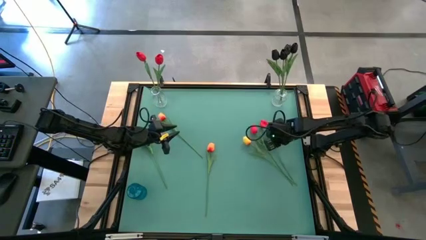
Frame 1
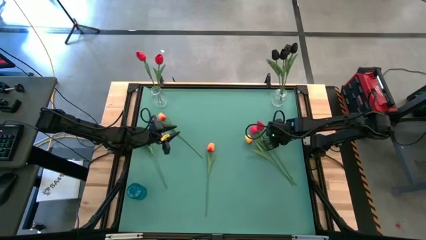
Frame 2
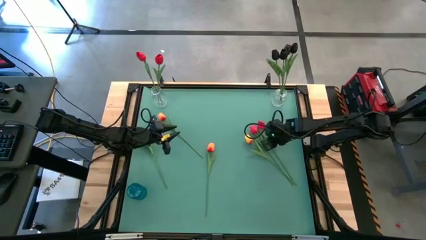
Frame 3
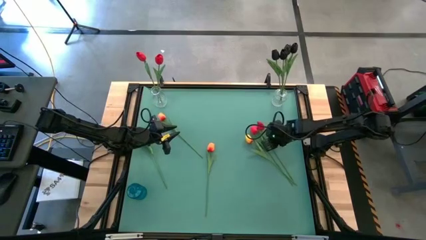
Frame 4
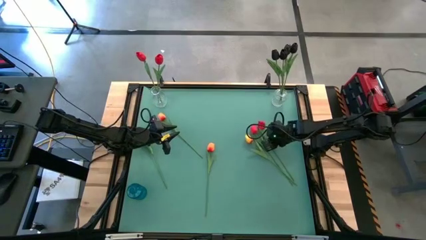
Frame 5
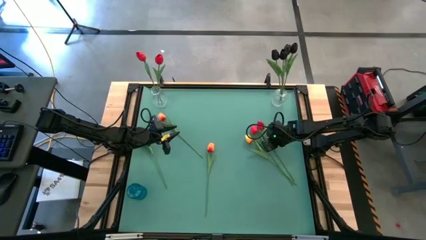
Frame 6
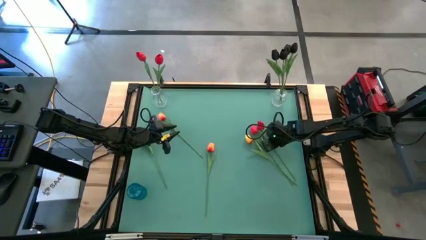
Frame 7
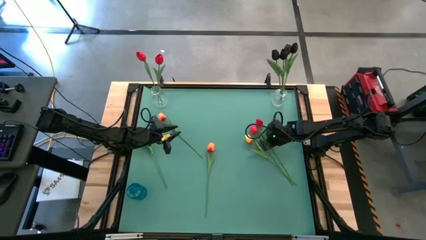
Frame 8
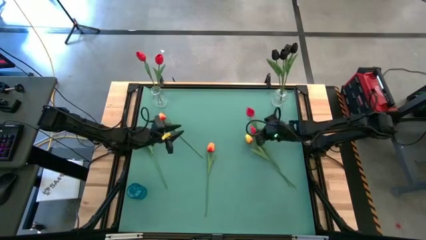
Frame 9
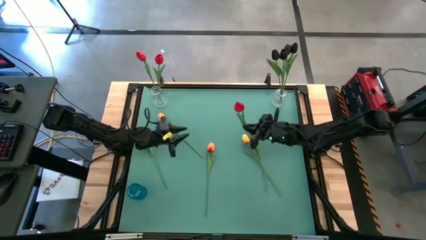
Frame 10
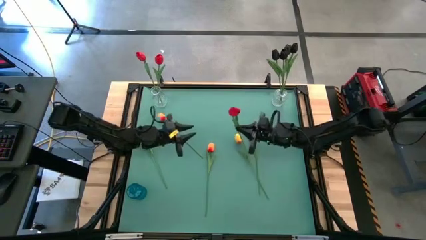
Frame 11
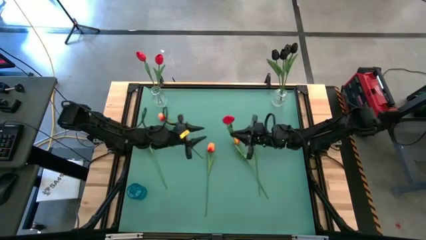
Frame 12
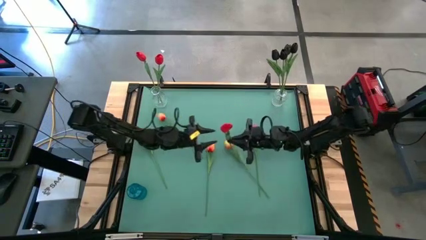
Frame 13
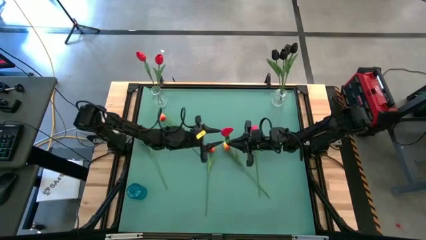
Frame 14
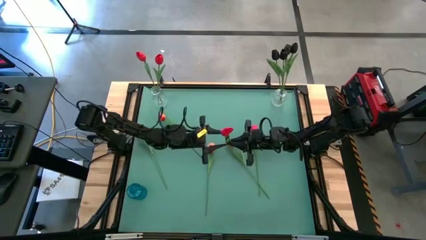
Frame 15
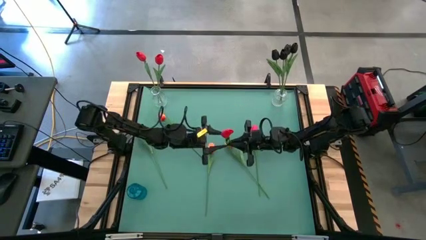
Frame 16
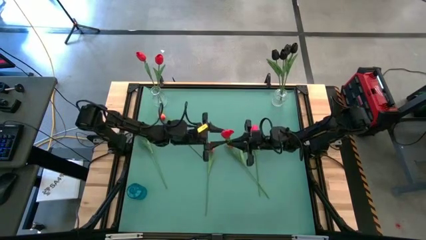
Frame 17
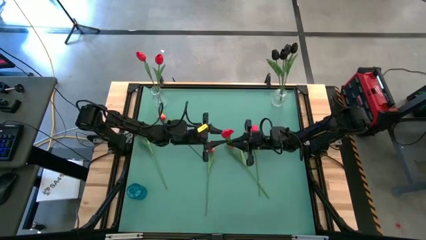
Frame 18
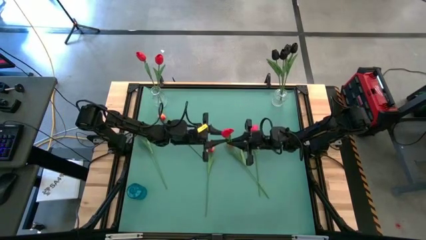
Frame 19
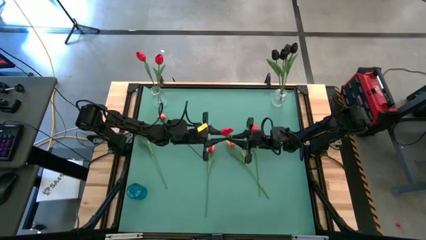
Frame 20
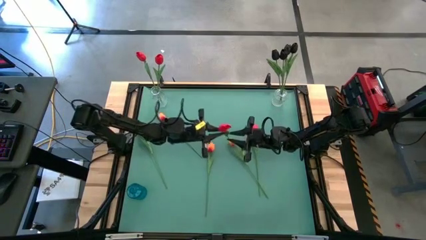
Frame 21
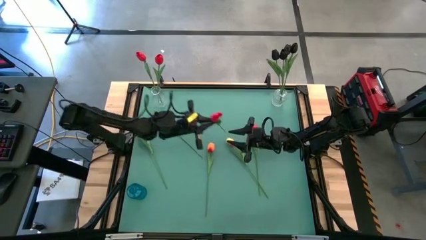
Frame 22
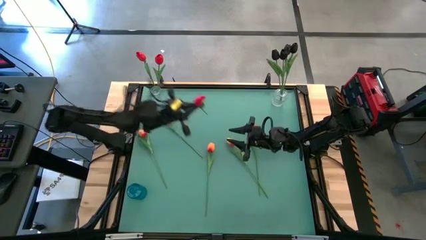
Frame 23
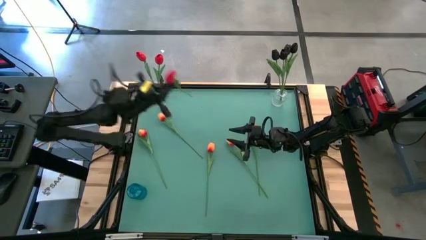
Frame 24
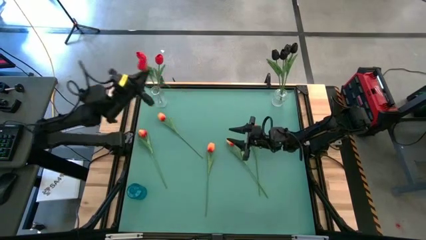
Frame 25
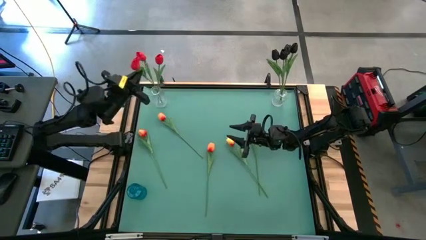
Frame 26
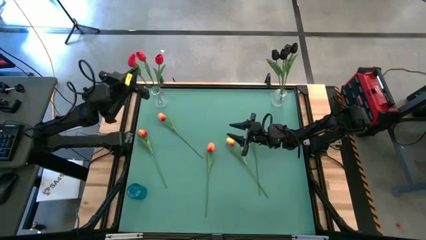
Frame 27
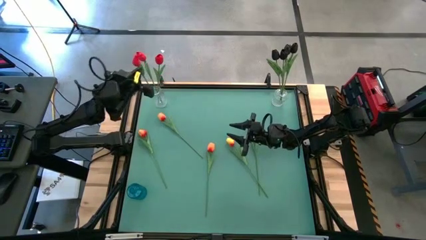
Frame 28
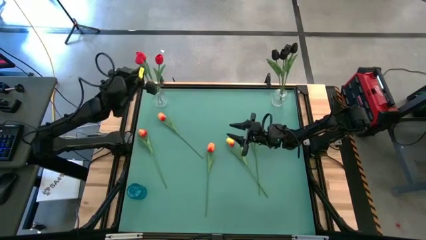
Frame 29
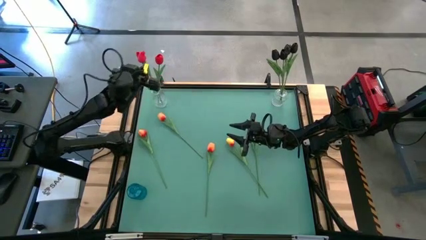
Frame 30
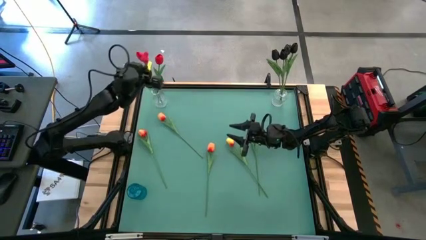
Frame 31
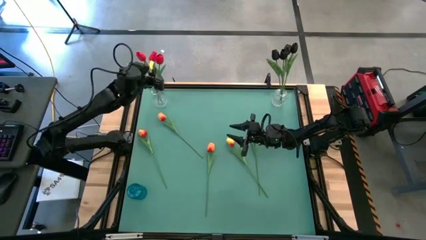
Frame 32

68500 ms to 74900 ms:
Task: Sort flowers into vase by color
Put the red tulip into the left transparent vase

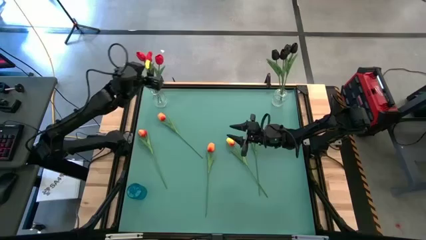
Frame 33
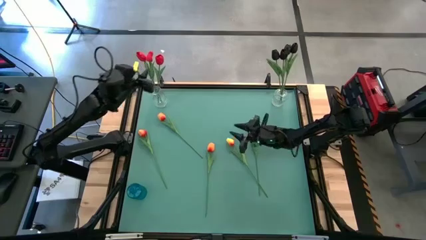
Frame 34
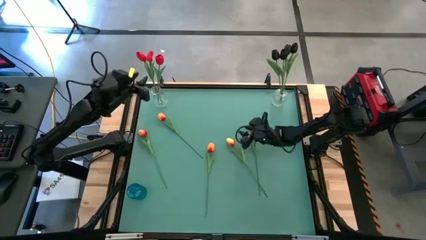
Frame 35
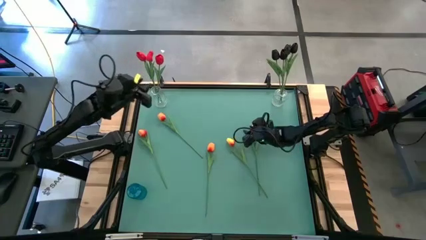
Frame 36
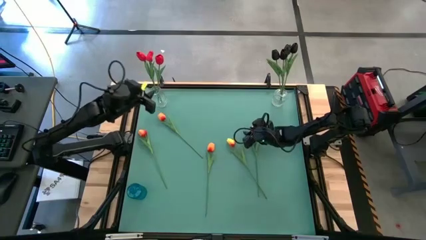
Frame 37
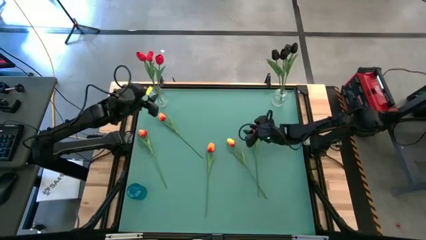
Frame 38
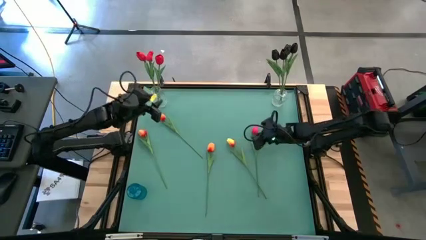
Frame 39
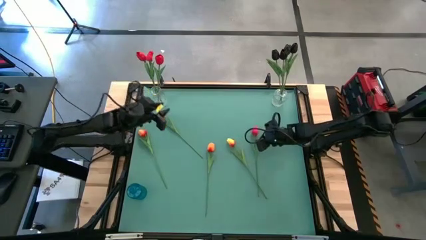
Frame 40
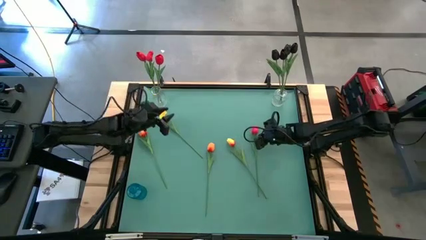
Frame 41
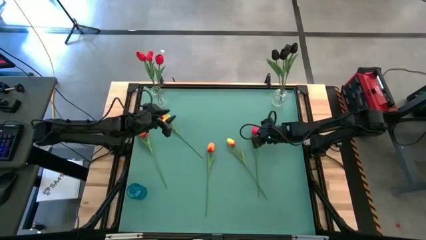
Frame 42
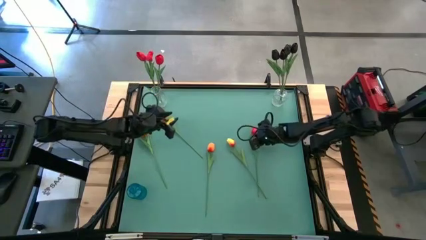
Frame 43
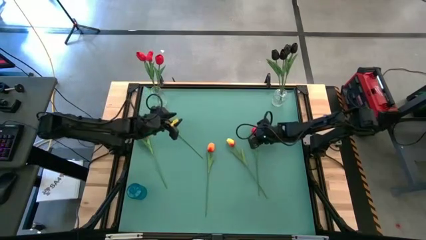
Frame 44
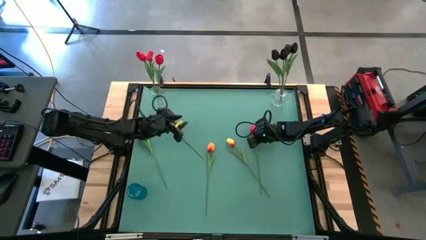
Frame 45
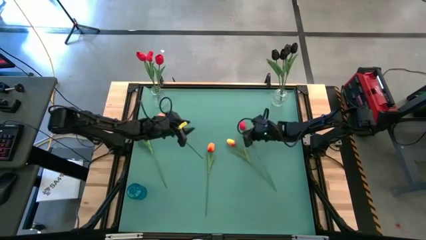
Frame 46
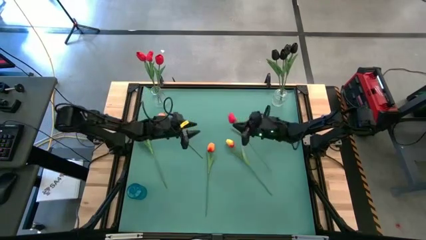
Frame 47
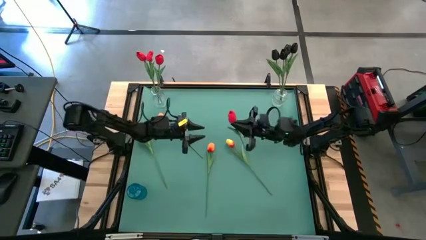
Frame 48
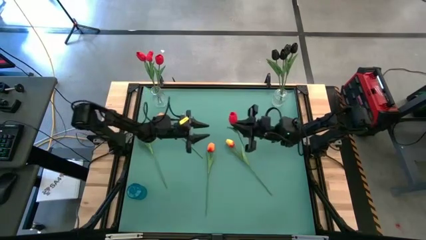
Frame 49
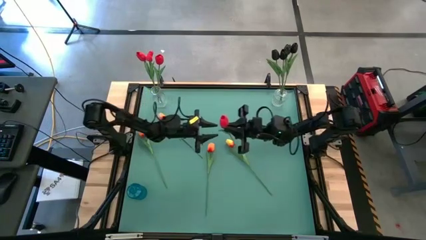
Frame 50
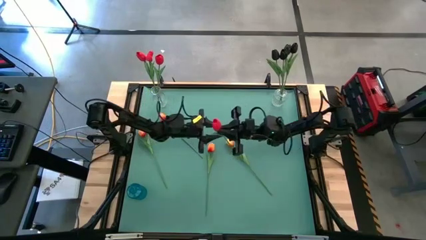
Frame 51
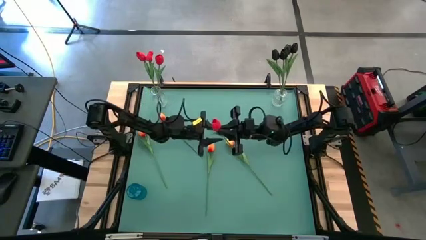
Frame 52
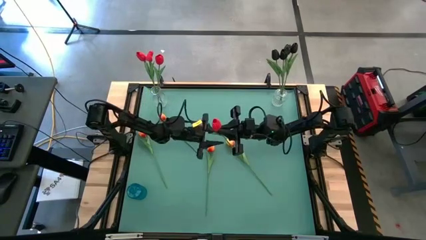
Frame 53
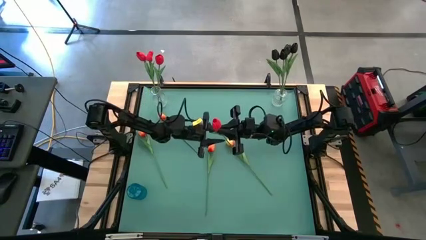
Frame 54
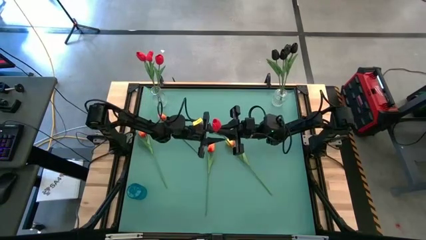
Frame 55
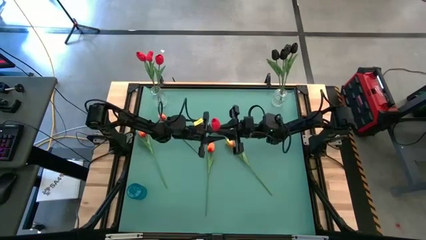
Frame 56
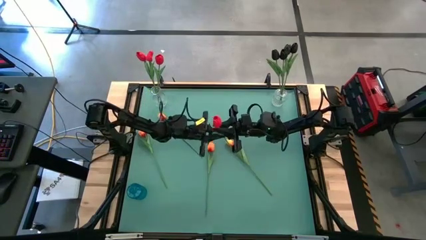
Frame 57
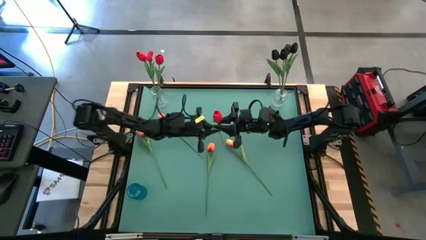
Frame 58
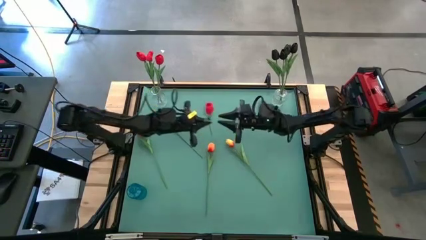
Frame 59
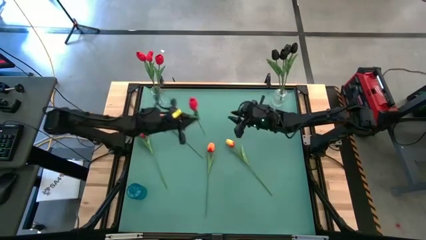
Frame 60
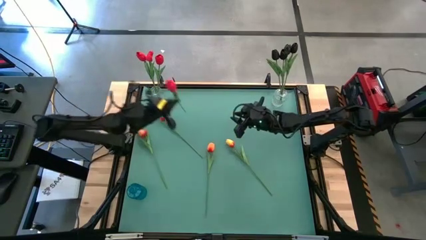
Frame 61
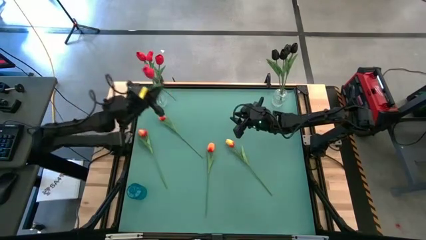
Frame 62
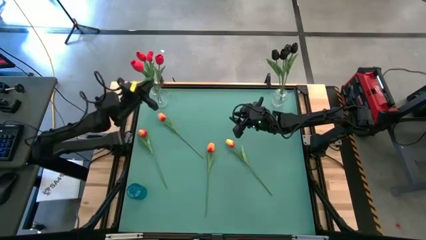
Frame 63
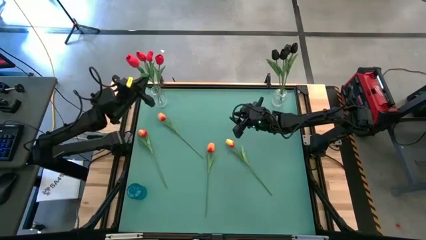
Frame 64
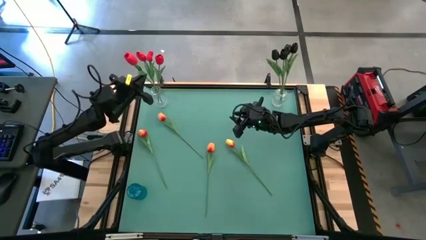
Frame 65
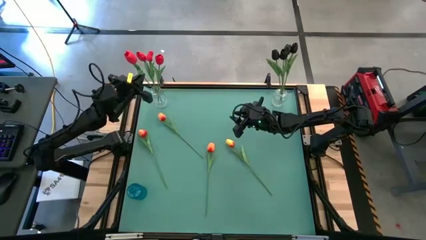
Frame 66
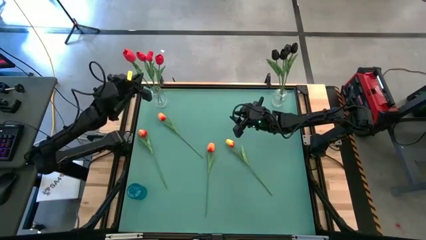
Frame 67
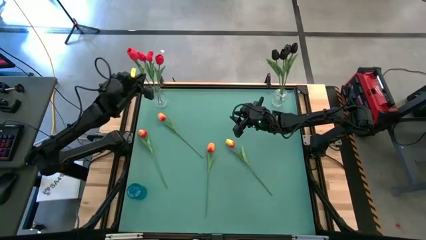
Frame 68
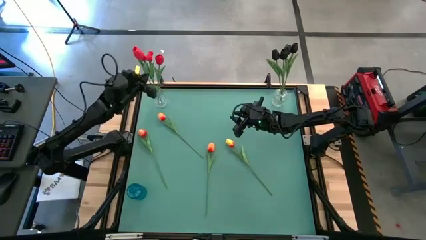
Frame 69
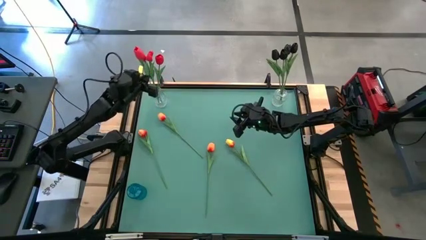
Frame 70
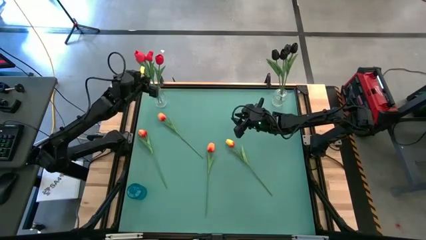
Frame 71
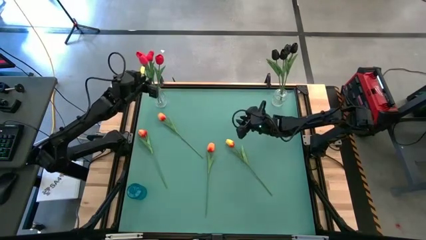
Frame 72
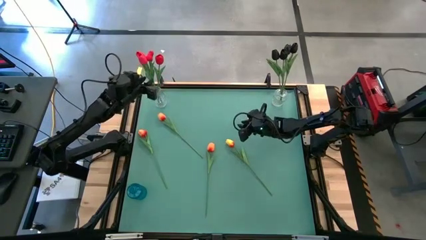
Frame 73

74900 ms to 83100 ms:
Put the red tulip into the top left transparent vase

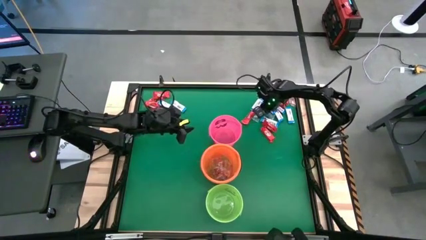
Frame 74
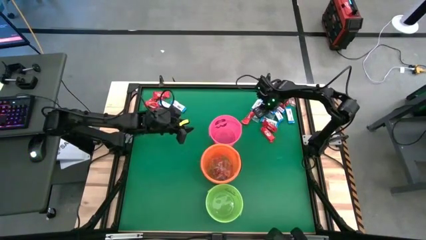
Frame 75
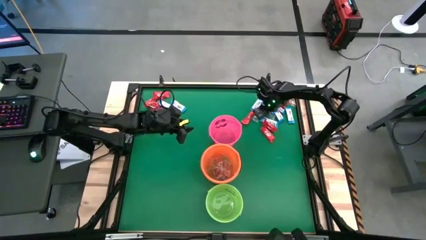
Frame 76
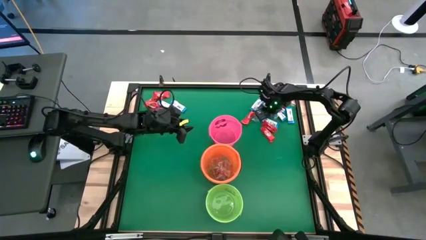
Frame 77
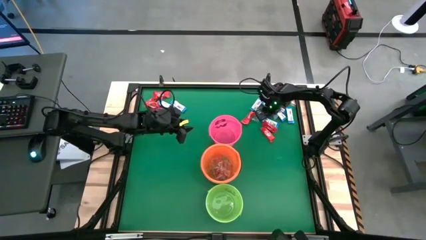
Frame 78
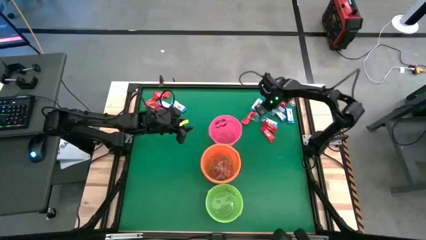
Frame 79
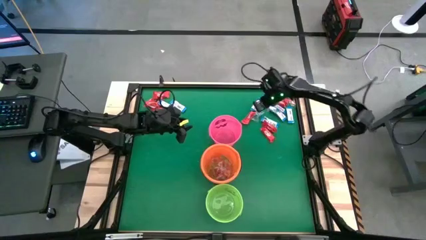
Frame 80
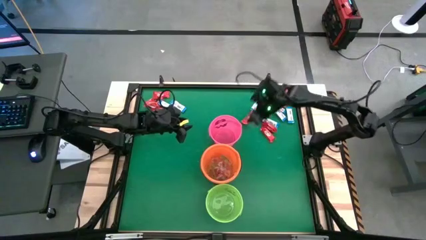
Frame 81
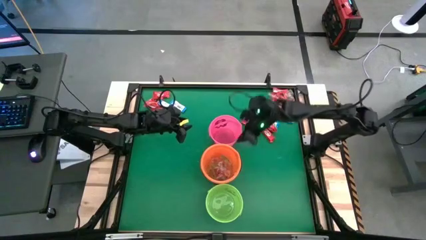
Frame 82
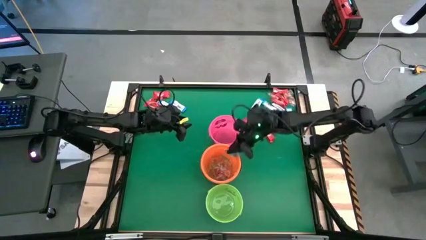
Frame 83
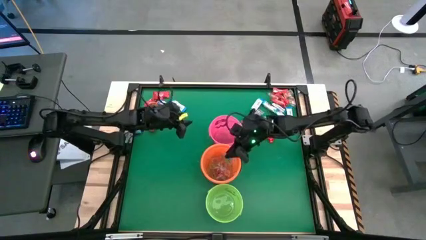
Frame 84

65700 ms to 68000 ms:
Task: Sort candy by brand, put in halloween buckets
Put the blue gummy into the orange bucket
